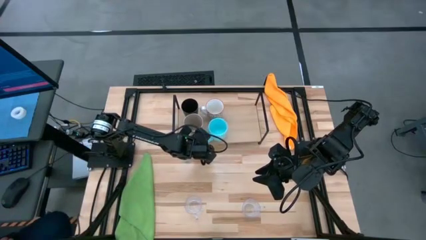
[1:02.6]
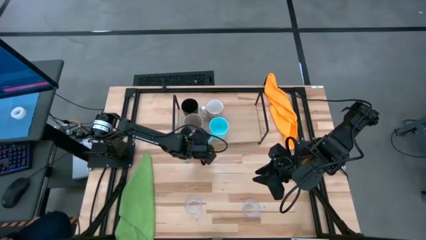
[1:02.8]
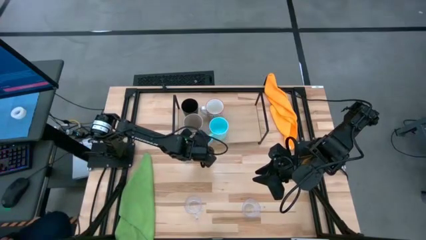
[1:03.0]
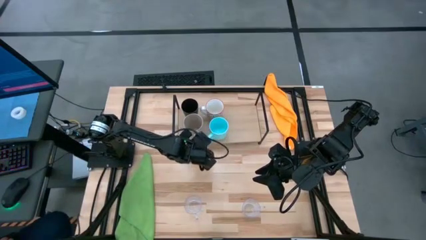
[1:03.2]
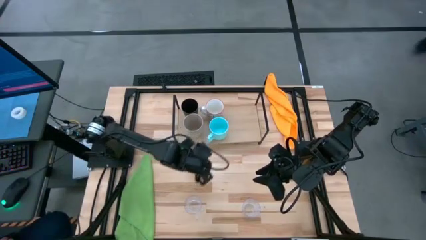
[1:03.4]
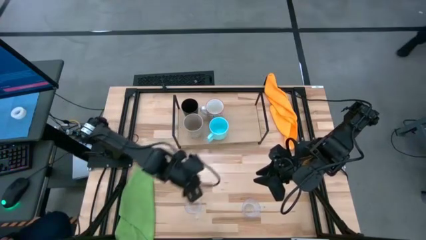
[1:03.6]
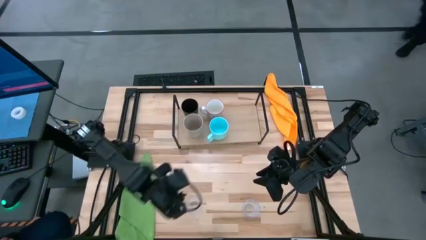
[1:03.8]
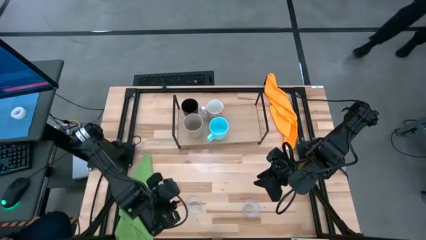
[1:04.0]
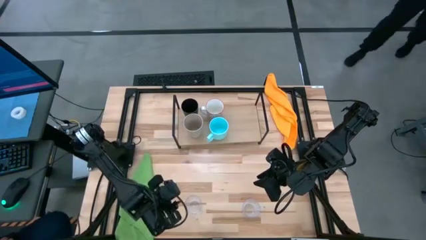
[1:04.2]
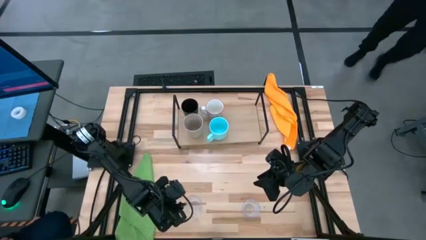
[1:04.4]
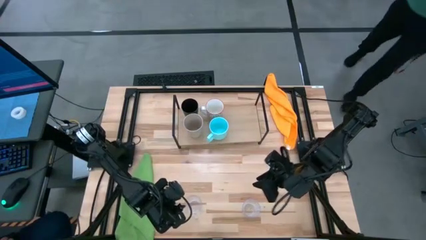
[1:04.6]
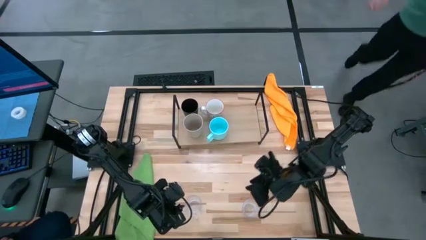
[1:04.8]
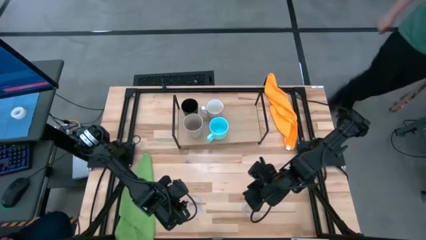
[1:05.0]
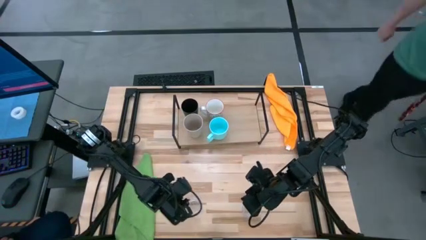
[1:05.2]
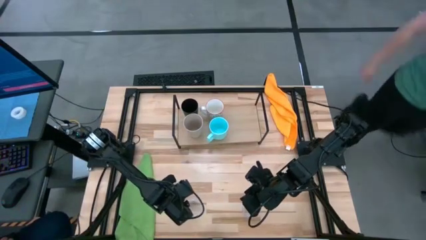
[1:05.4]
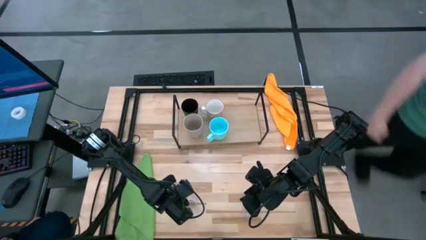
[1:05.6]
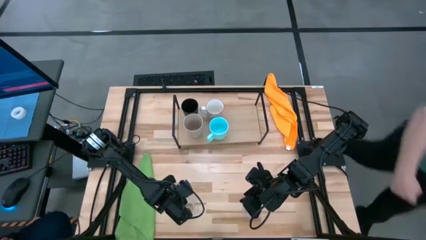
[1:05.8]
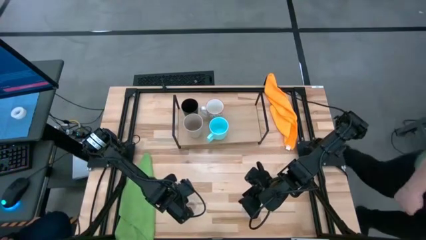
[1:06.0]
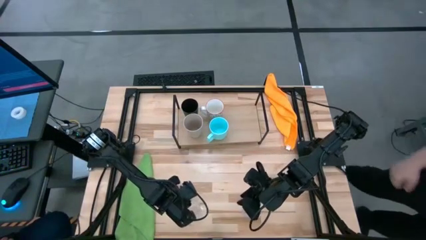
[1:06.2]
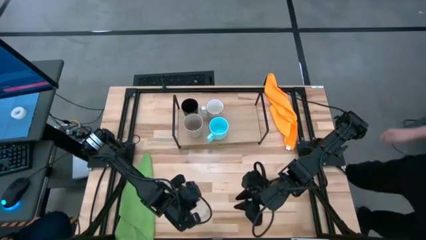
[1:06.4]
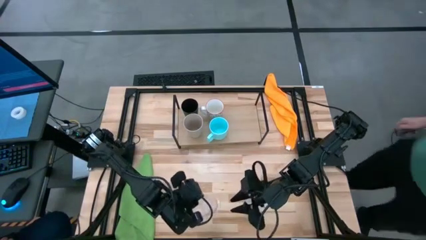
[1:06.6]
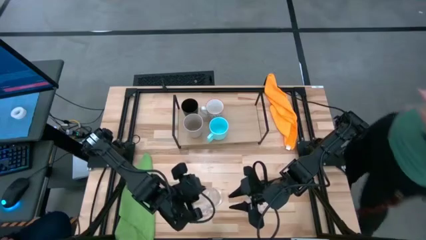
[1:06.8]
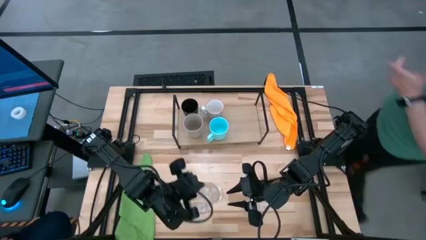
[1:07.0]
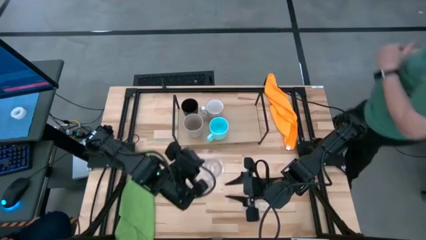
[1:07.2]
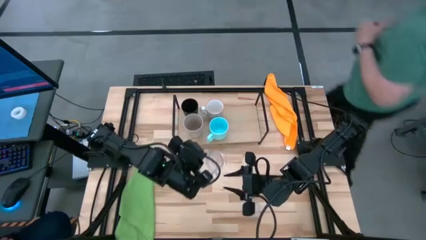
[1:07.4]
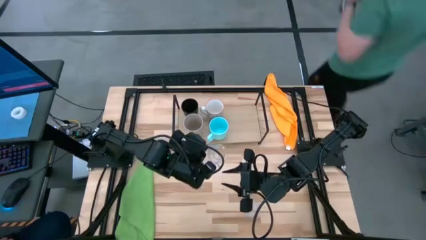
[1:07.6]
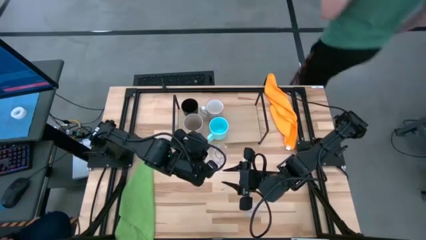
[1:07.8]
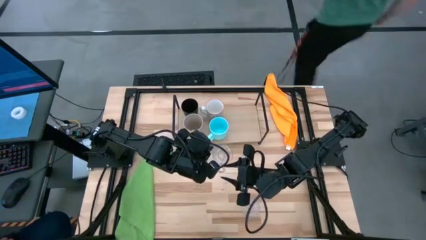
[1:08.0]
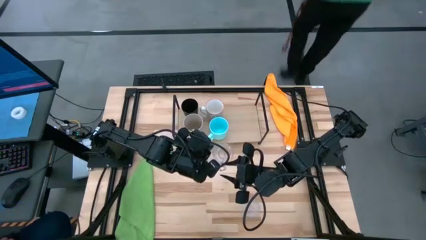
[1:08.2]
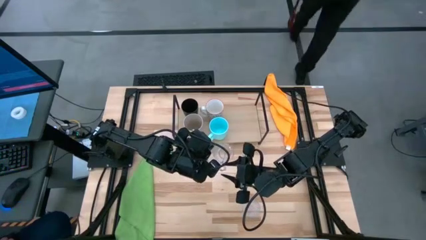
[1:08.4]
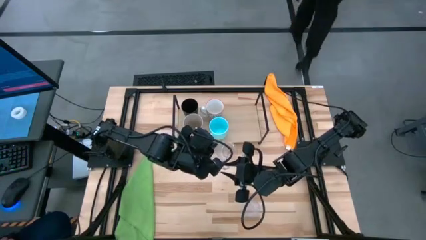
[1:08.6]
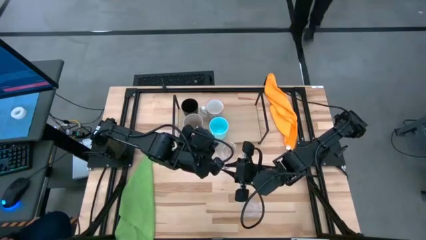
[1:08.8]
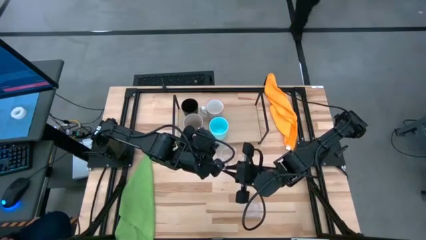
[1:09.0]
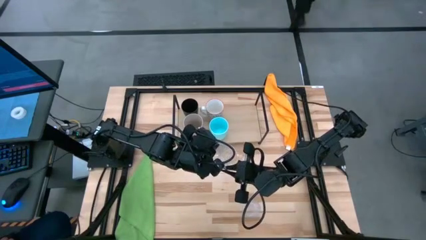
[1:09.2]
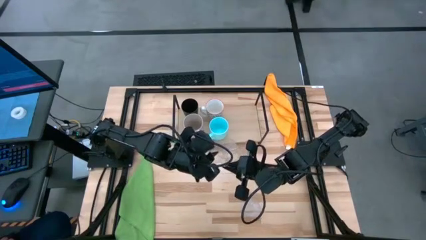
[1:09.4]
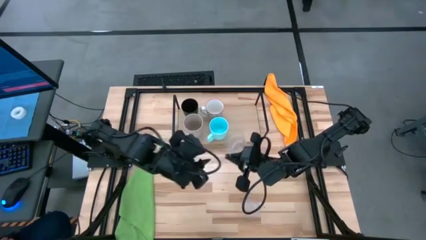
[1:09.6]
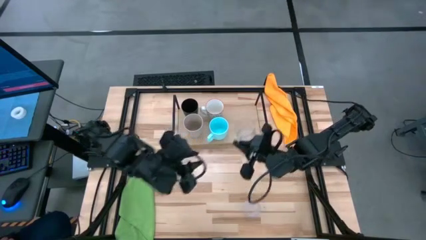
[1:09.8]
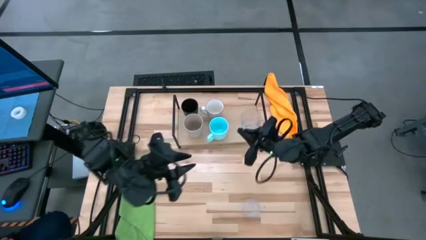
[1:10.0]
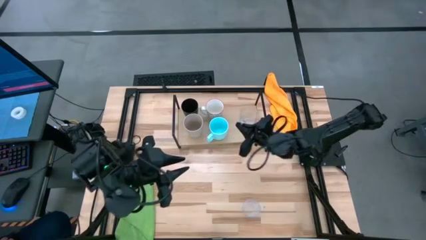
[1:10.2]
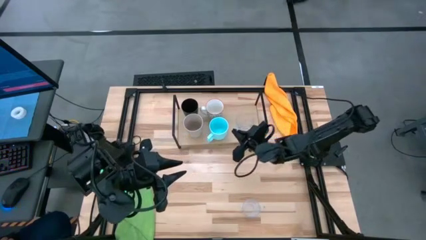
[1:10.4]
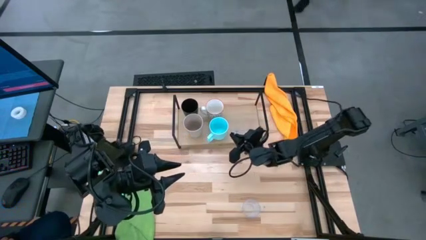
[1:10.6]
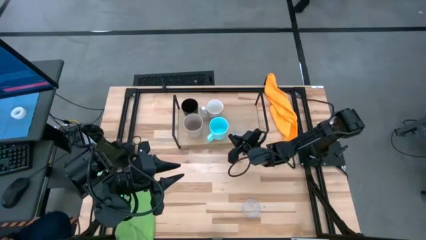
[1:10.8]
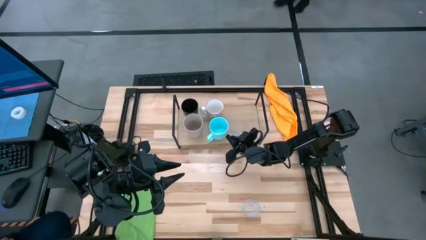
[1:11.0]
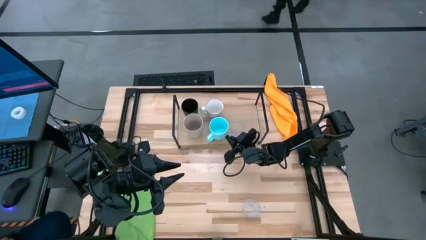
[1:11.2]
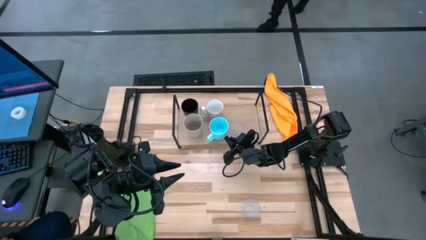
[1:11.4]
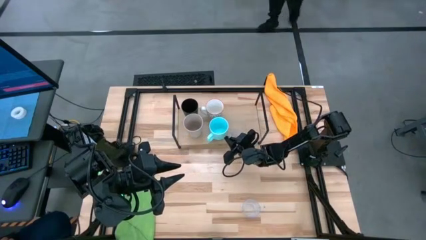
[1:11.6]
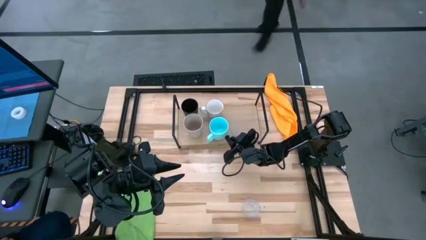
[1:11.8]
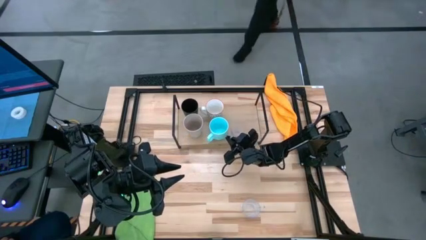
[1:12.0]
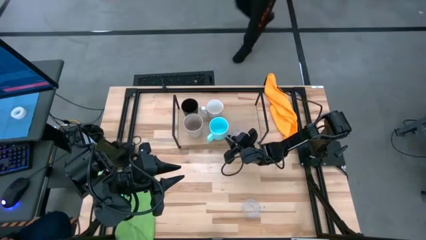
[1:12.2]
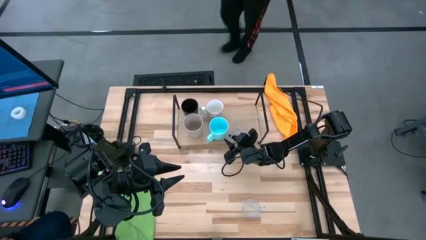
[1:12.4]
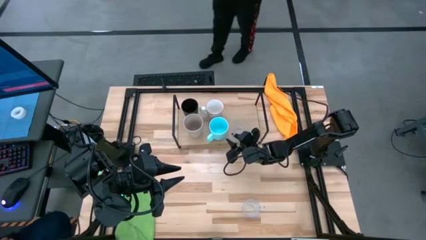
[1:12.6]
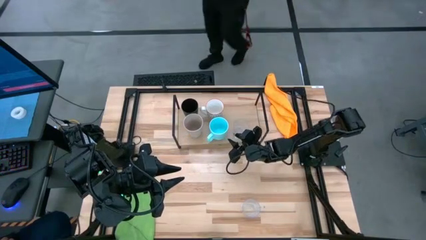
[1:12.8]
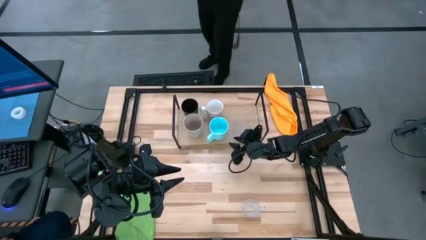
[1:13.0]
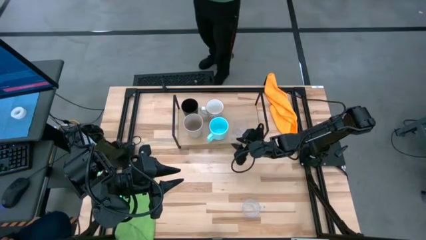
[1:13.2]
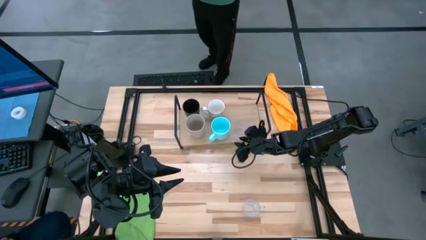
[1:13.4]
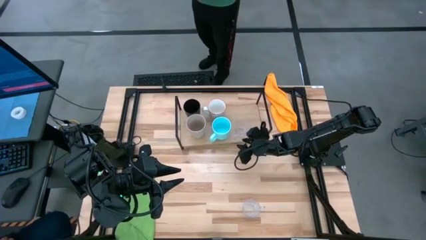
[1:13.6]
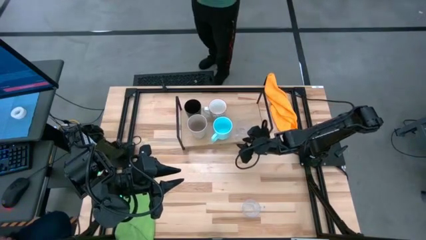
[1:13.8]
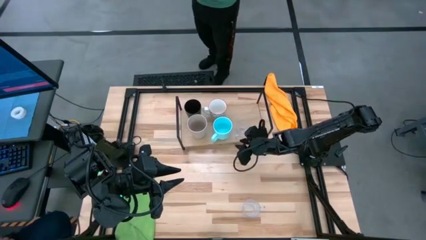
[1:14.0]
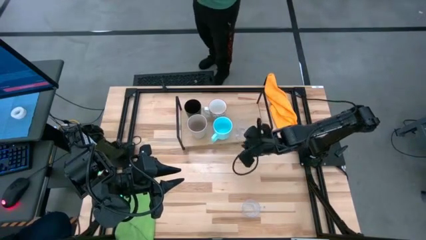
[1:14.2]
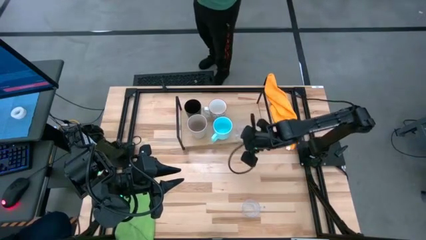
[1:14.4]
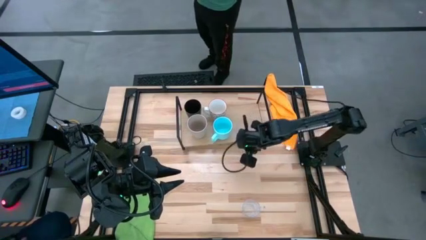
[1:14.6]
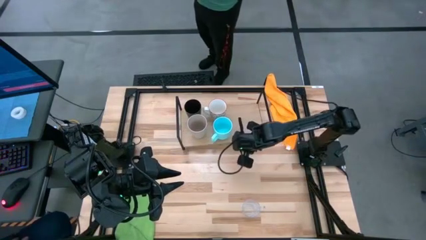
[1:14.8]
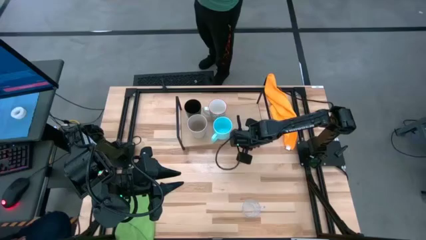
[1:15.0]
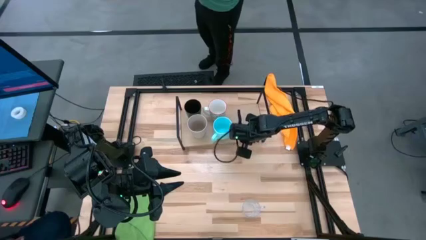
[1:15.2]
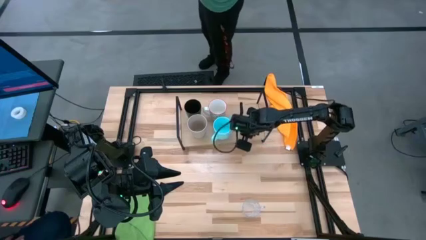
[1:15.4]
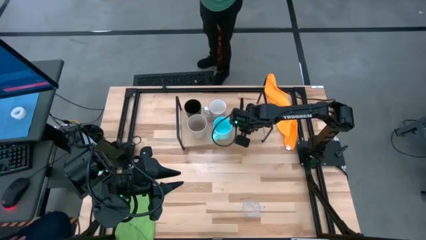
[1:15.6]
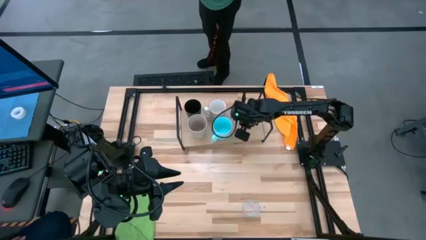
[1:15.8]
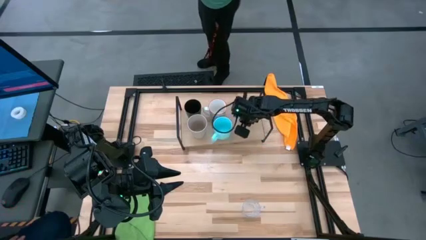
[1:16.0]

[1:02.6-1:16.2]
Task: Stack small to large cups/mugs on shelf
Put the left transparent mug on the shelf

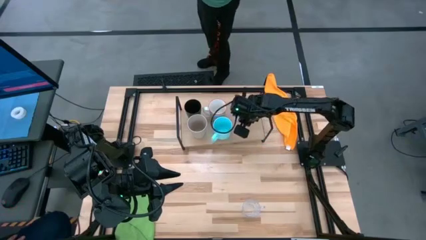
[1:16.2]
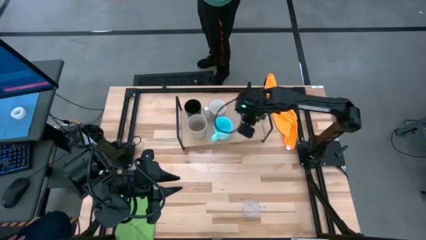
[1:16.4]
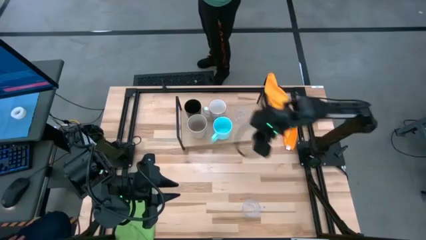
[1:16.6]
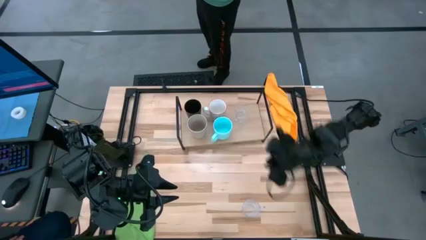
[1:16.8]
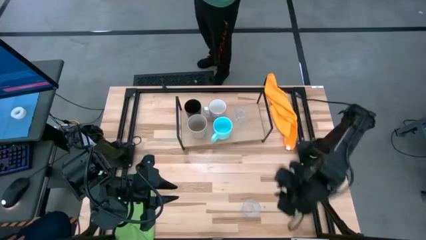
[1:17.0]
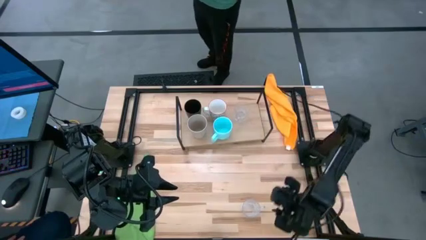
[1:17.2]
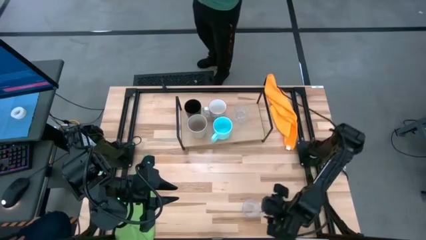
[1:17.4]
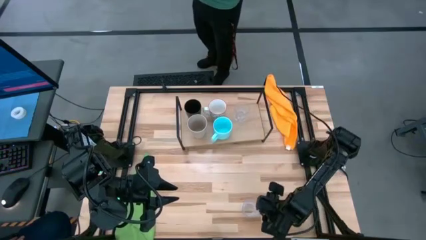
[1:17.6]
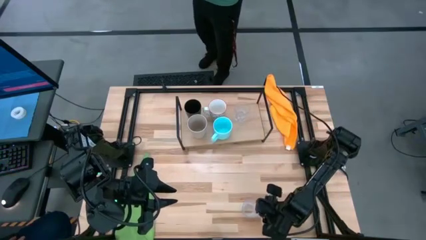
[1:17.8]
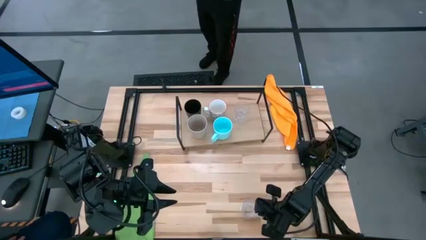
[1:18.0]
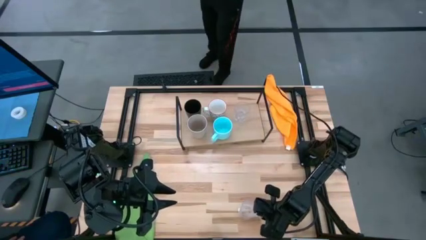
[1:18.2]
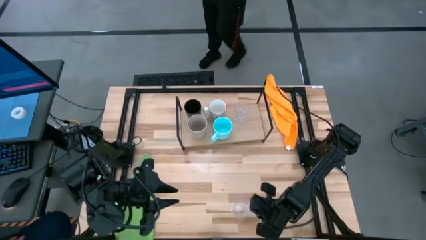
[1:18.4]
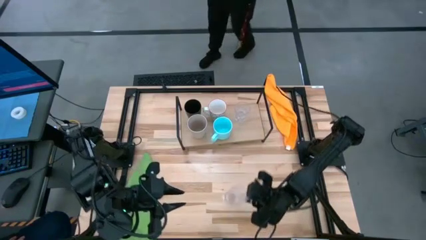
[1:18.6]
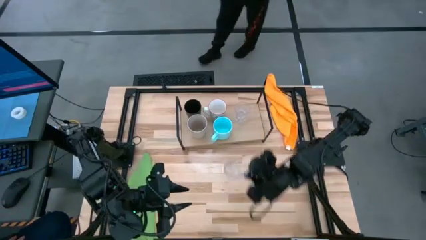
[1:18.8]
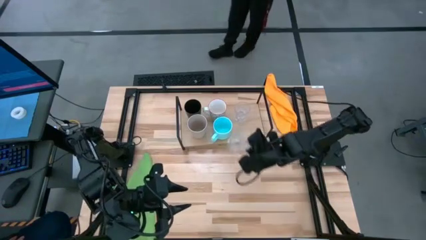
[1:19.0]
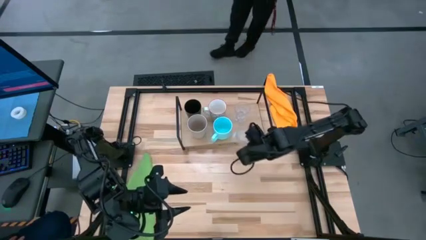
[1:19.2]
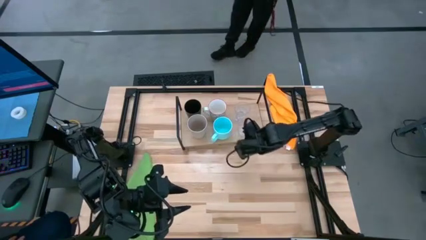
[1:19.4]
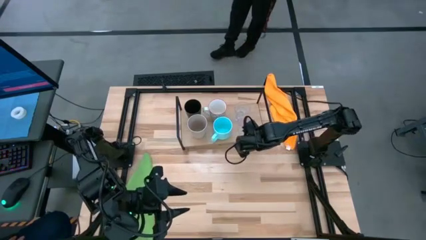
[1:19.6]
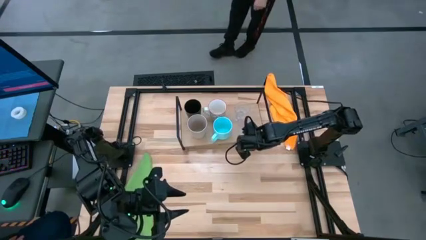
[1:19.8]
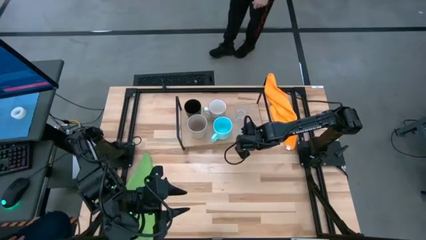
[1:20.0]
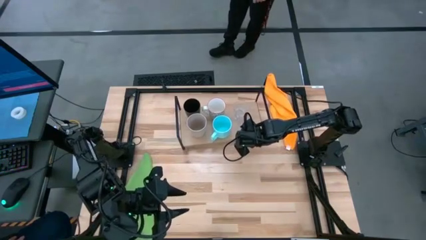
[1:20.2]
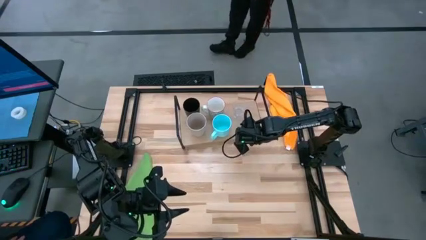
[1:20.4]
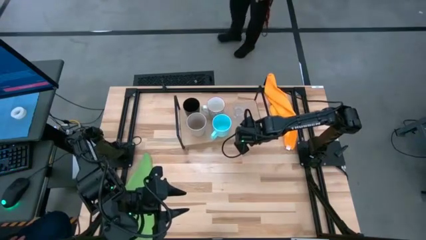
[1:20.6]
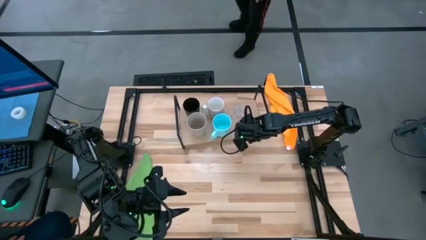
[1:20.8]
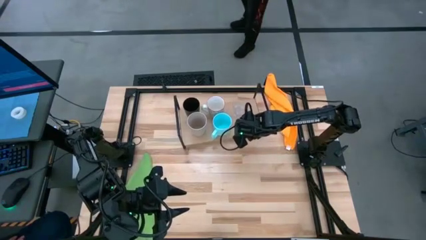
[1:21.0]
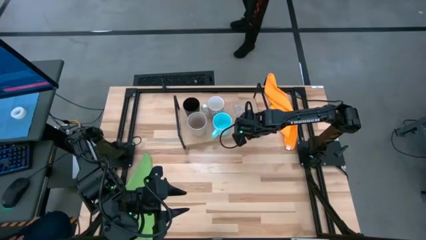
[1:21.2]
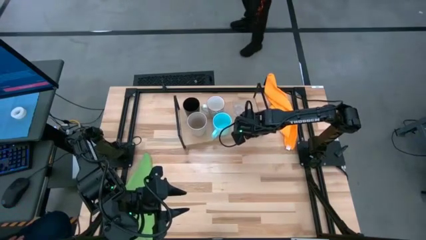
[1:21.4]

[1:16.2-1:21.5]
Put the transparent mug on the shelf
